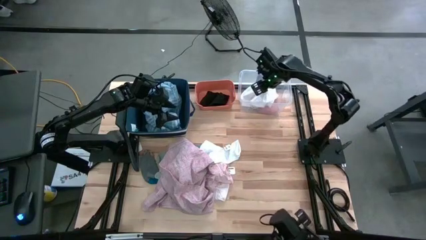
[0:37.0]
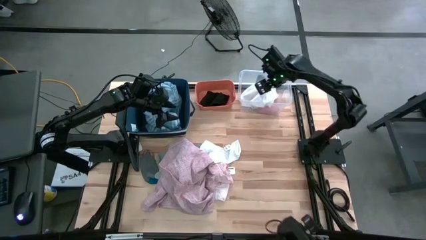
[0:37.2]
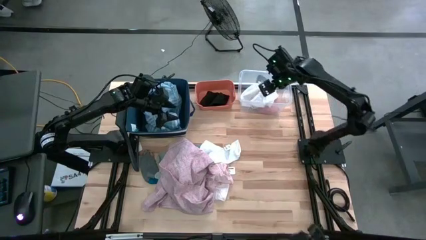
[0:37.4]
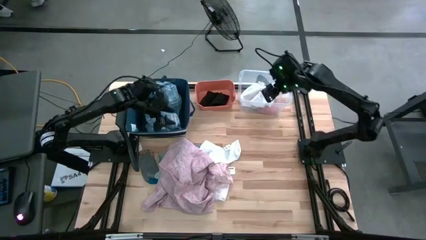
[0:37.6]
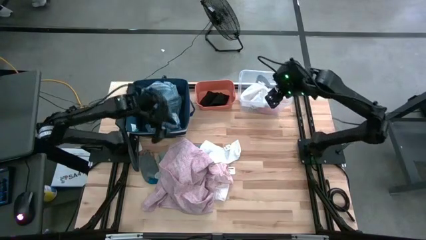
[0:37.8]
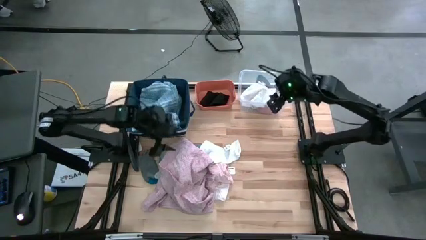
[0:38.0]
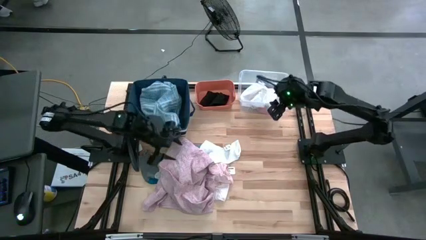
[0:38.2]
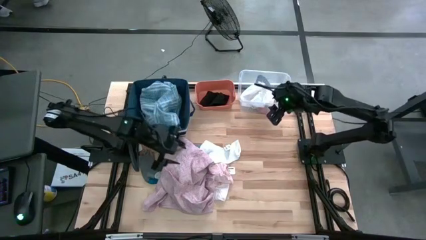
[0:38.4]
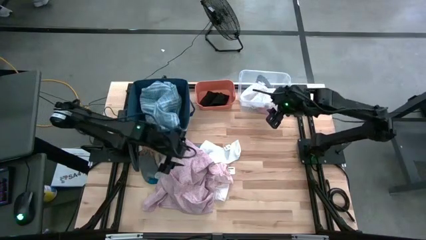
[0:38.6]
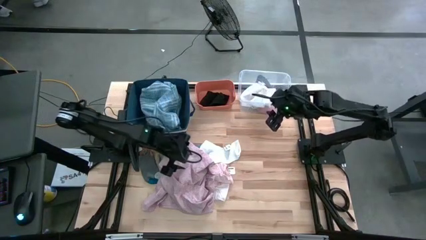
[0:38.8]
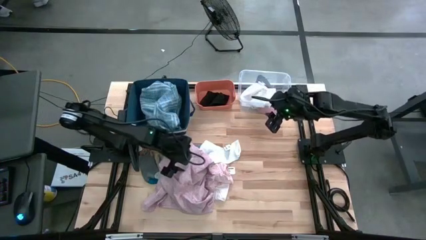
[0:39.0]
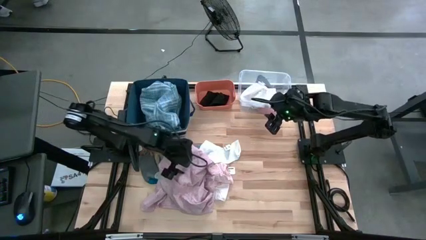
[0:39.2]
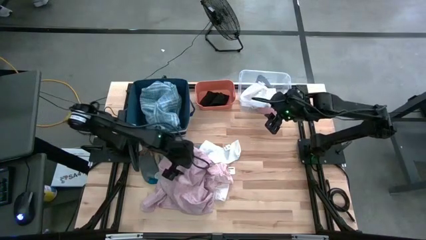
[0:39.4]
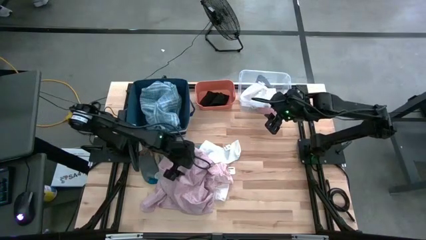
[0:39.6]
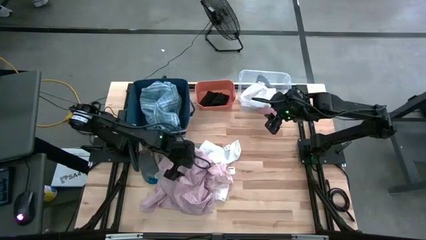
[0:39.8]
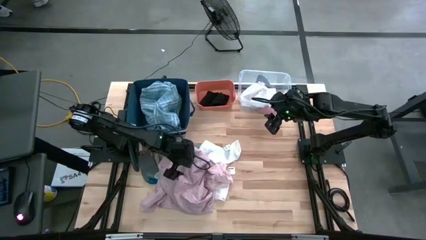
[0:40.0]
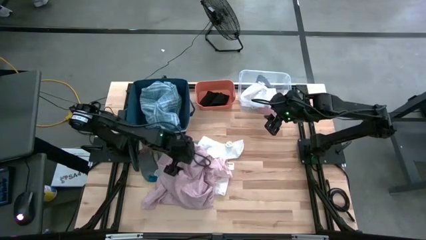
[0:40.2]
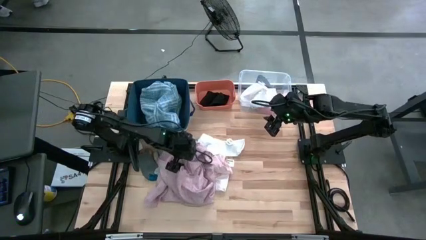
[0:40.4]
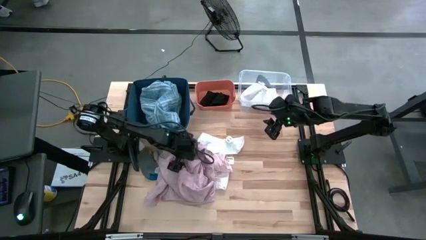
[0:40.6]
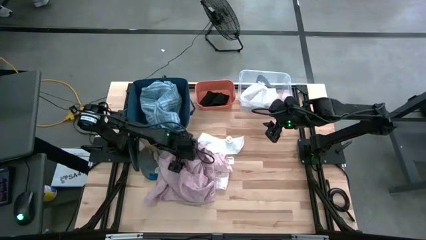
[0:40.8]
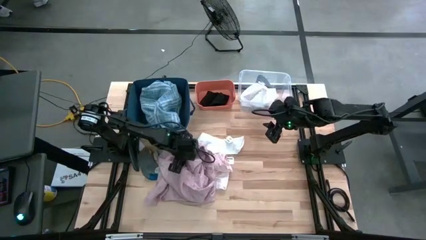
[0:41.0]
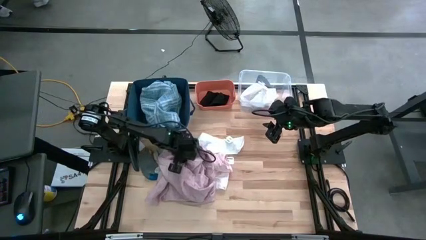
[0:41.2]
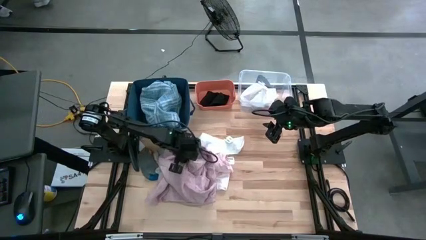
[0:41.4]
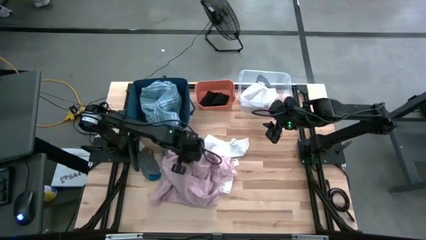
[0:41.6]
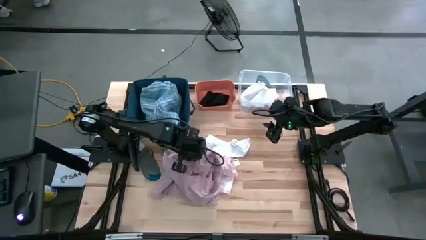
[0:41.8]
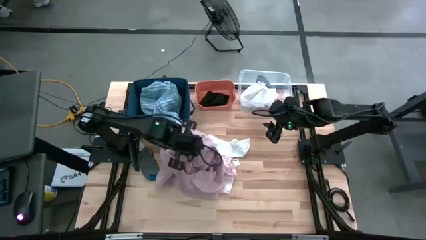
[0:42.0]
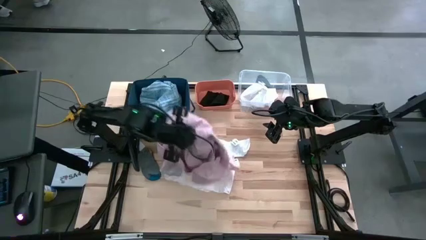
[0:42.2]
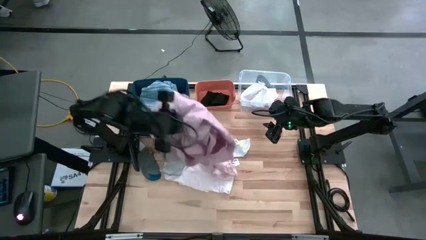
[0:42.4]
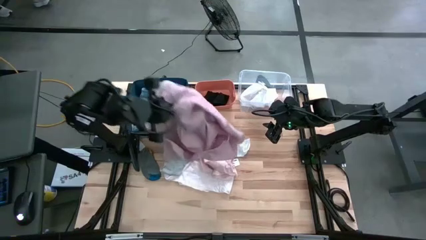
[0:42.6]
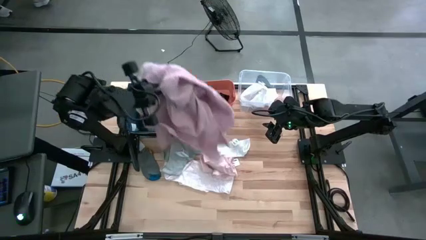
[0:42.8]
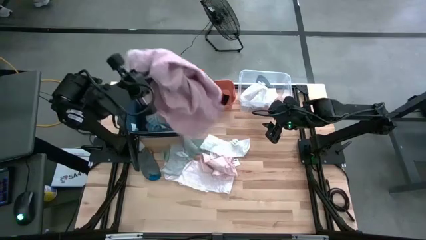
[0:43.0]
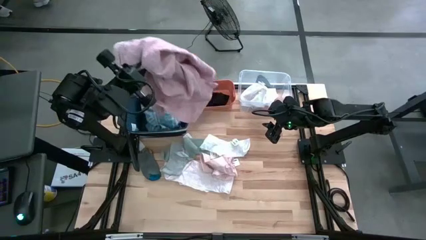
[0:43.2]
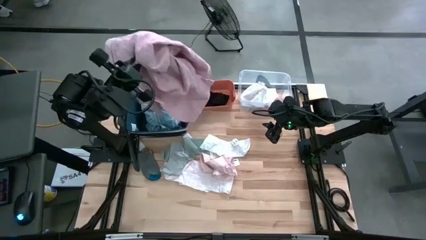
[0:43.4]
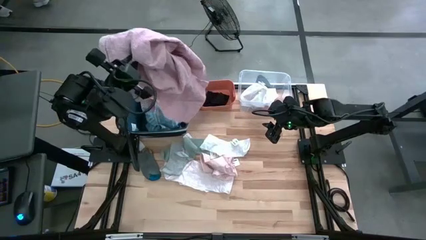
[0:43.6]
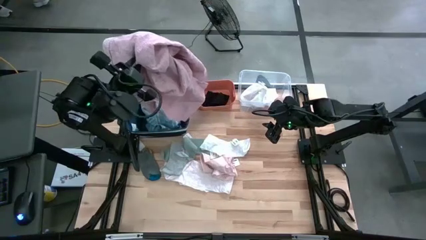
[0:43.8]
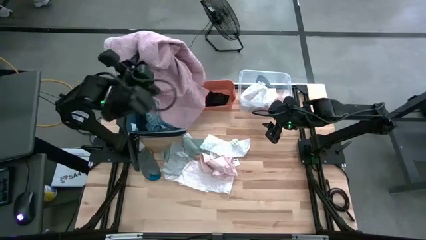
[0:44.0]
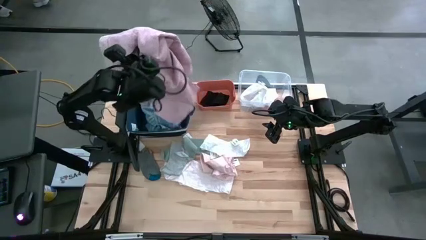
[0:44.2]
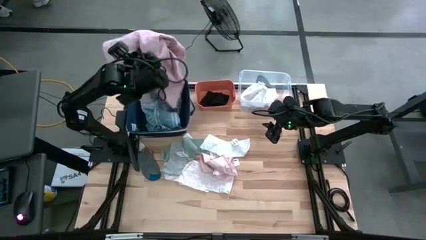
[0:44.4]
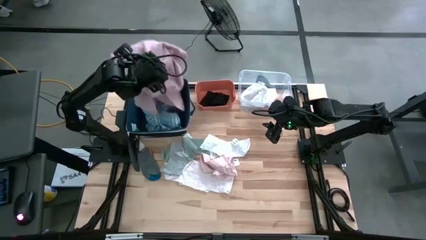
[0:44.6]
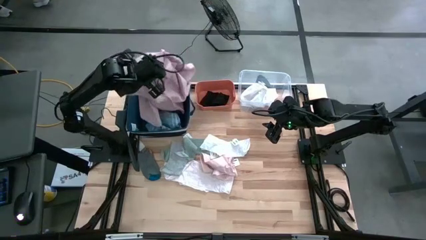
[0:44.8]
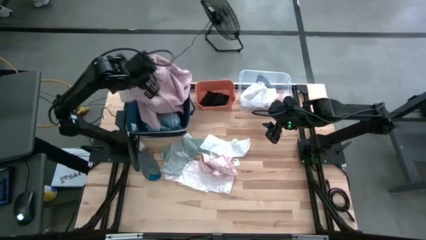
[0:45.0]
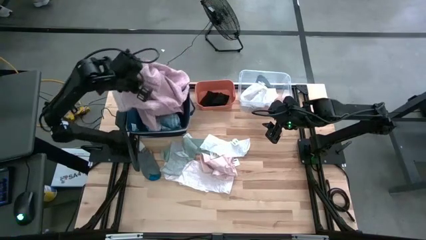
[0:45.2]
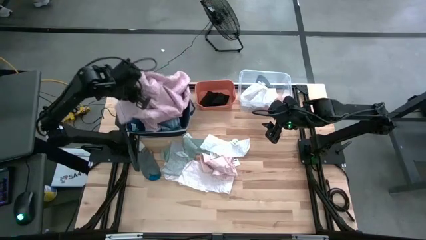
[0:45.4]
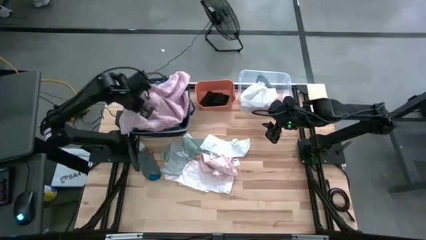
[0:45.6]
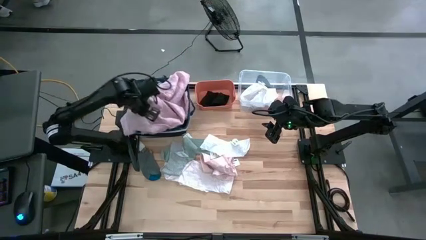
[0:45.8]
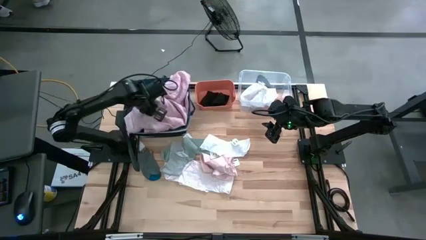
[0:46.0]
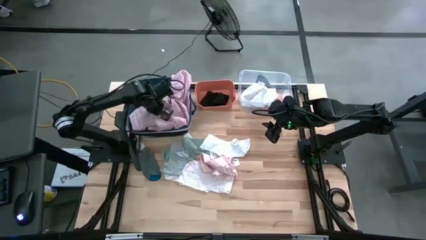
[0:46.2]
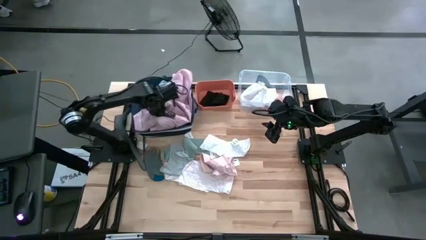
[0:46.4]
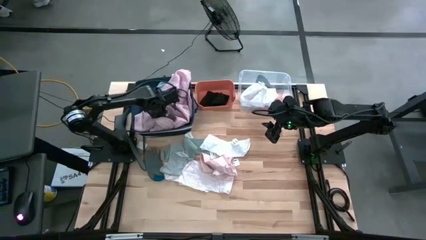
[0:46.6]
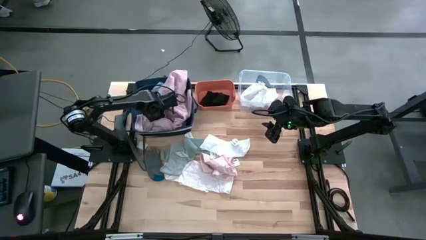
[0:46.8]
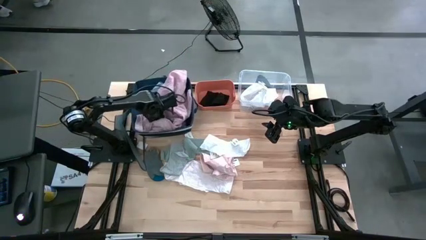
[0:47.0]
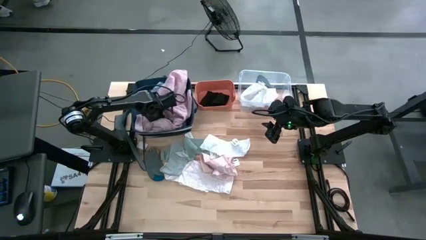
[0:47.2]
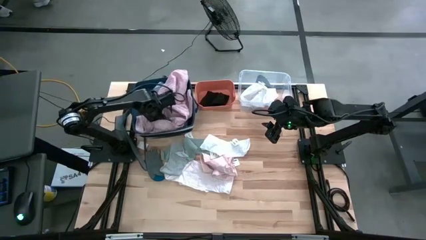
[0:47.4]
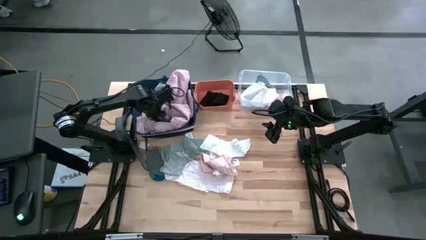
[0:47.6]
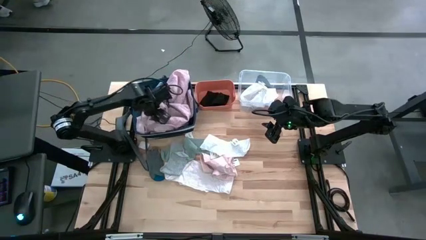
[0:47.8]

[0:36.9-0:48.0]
Task: Pick & Place Cloths
Put the pink blouse into the blue organizer
